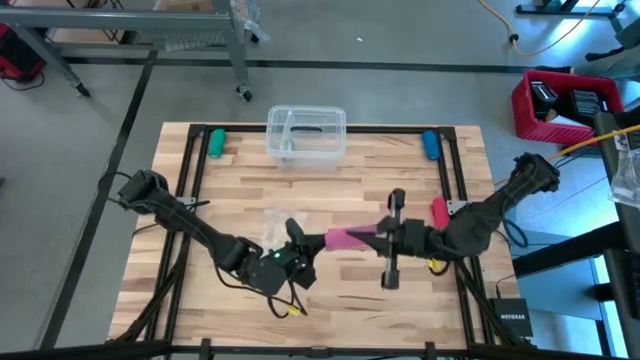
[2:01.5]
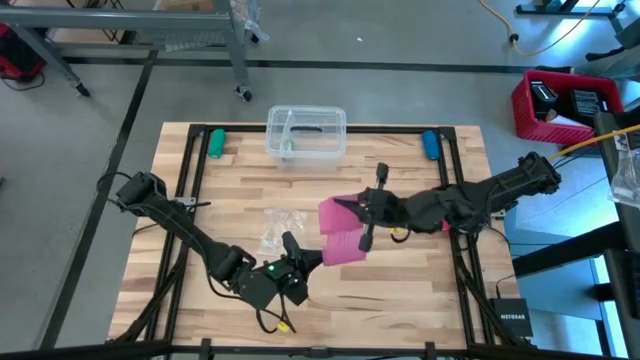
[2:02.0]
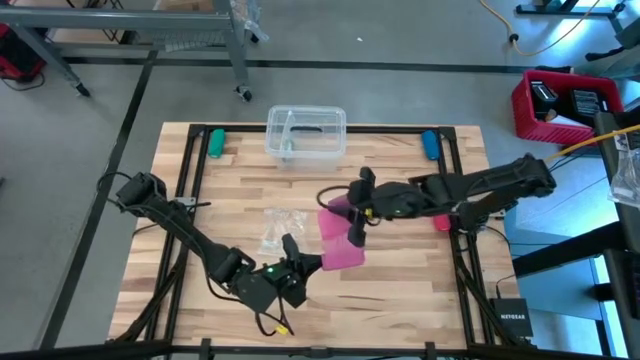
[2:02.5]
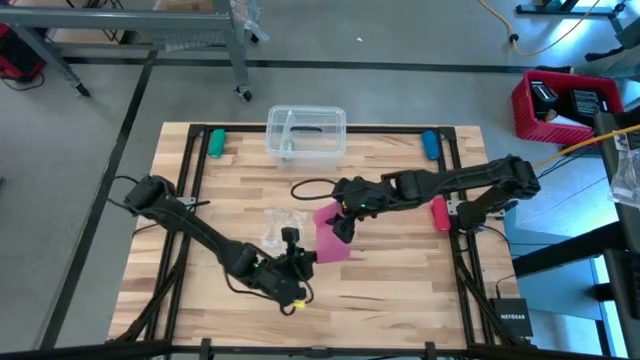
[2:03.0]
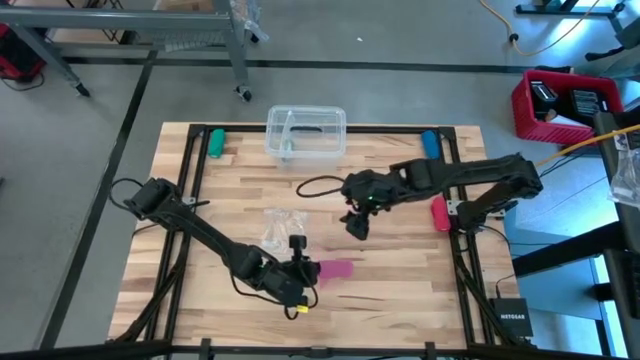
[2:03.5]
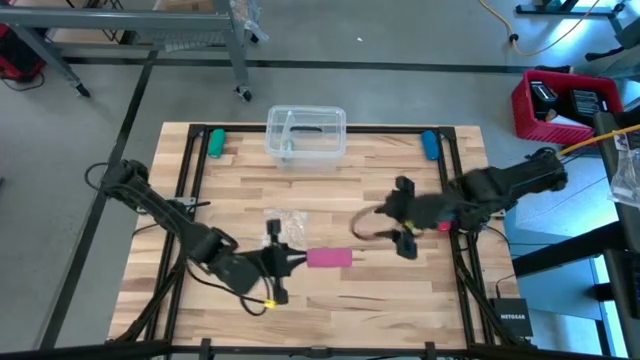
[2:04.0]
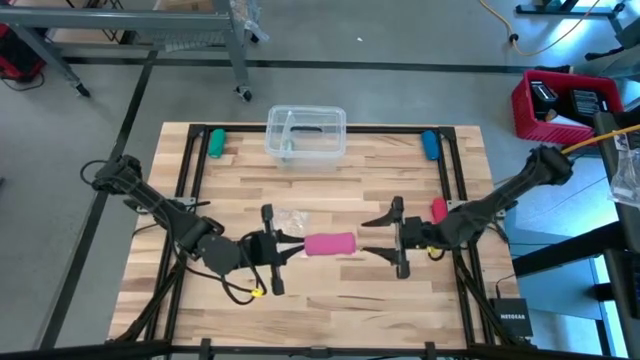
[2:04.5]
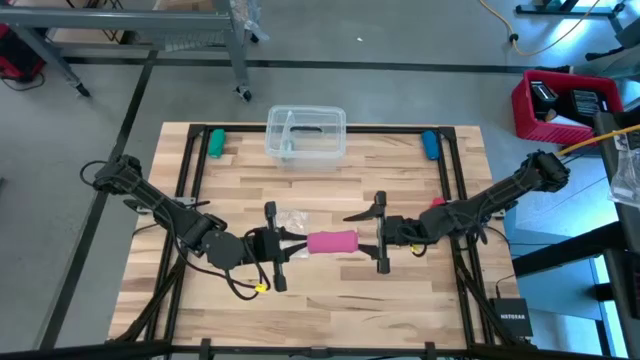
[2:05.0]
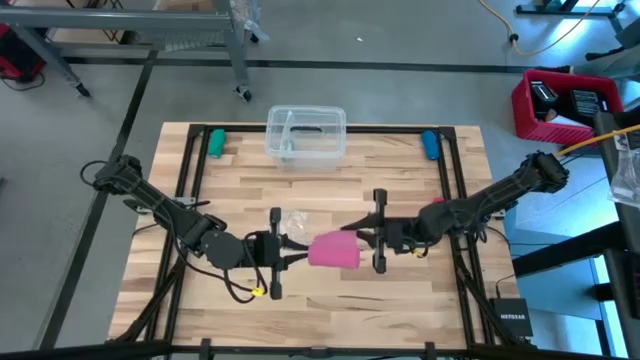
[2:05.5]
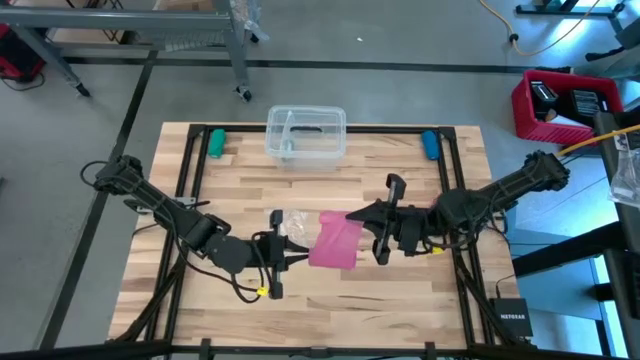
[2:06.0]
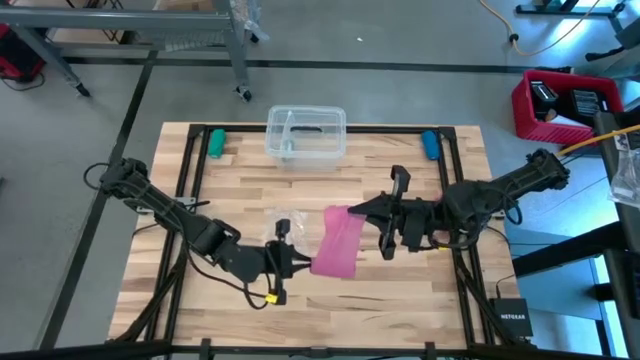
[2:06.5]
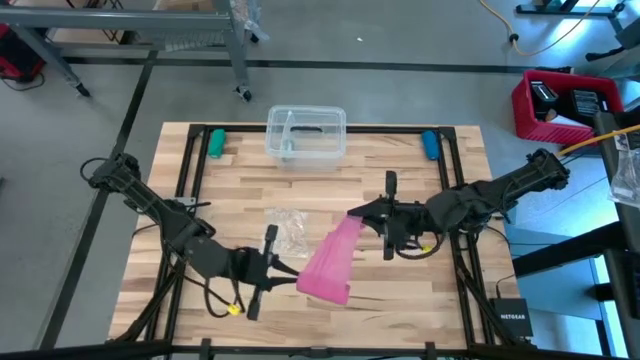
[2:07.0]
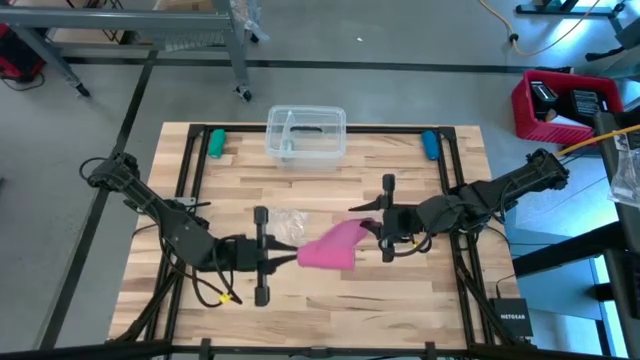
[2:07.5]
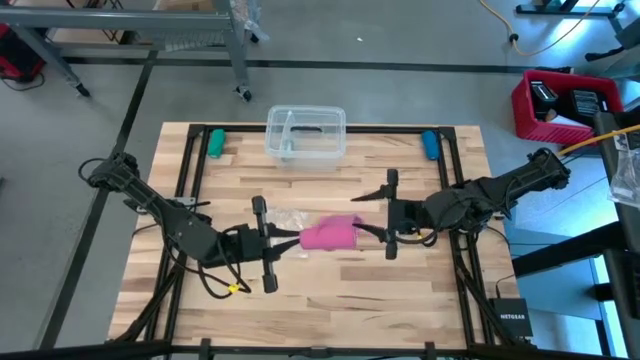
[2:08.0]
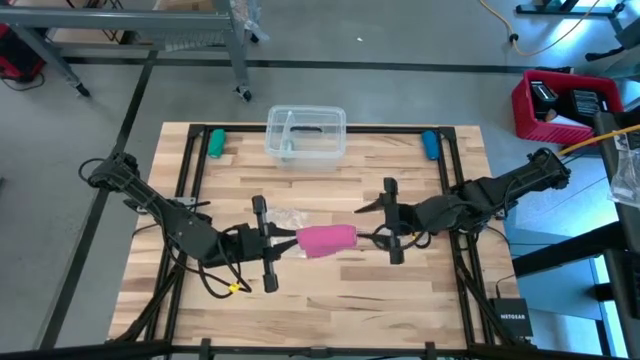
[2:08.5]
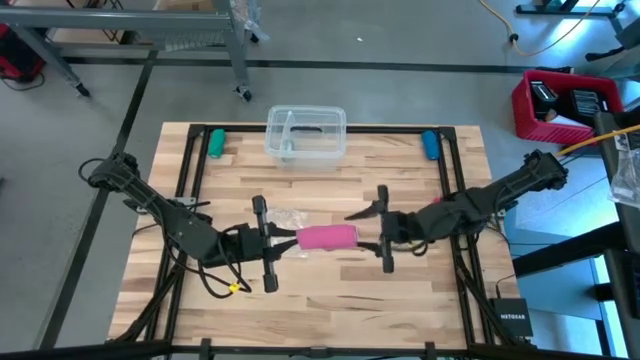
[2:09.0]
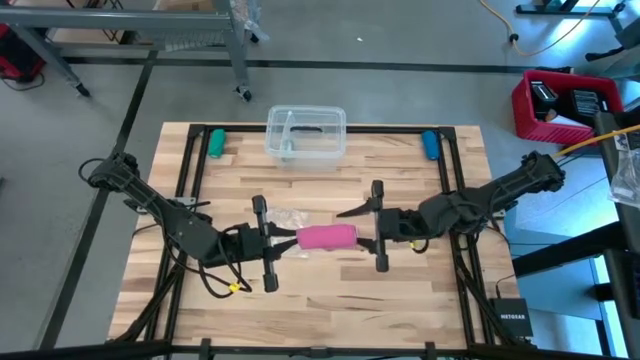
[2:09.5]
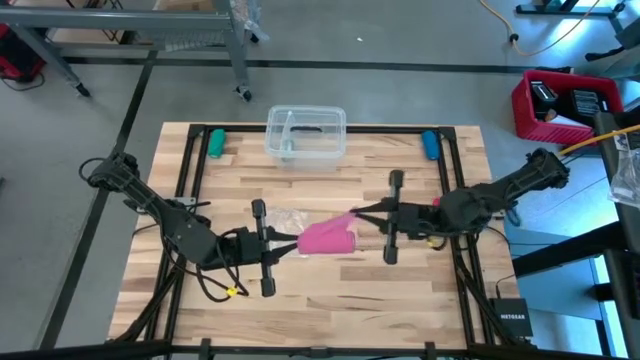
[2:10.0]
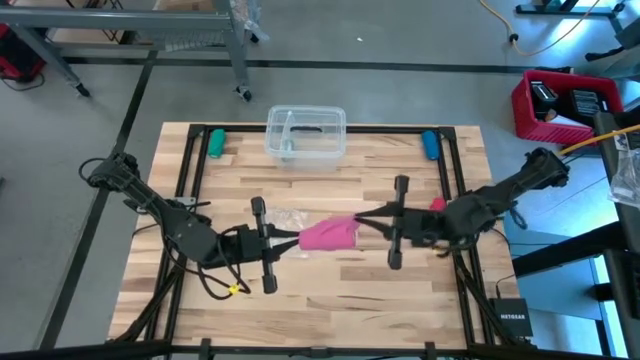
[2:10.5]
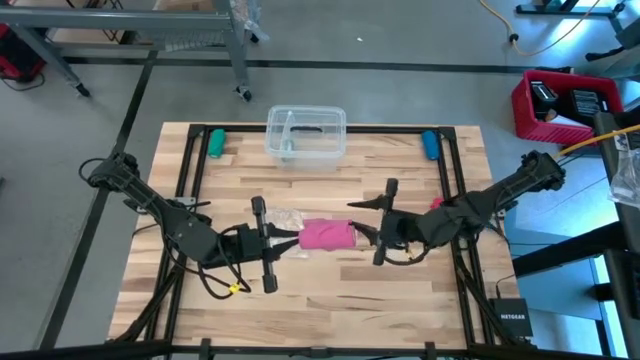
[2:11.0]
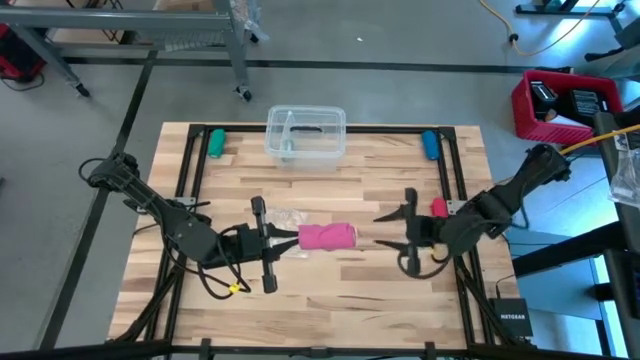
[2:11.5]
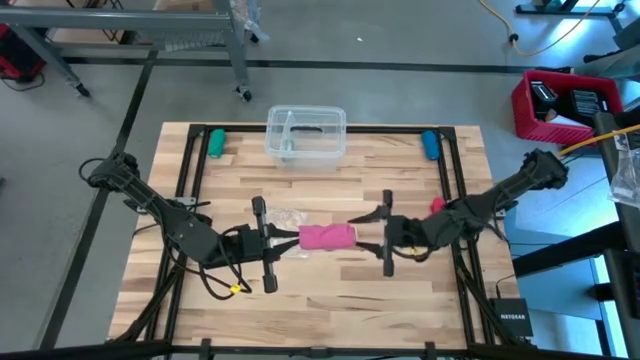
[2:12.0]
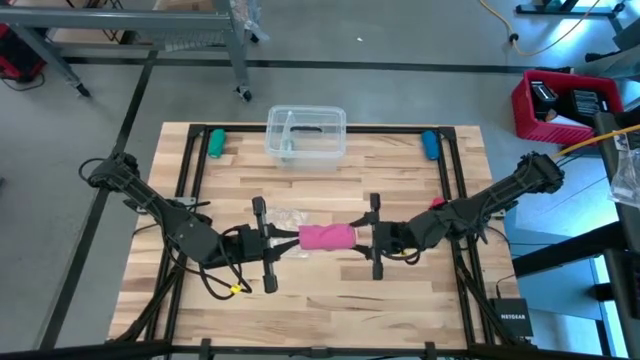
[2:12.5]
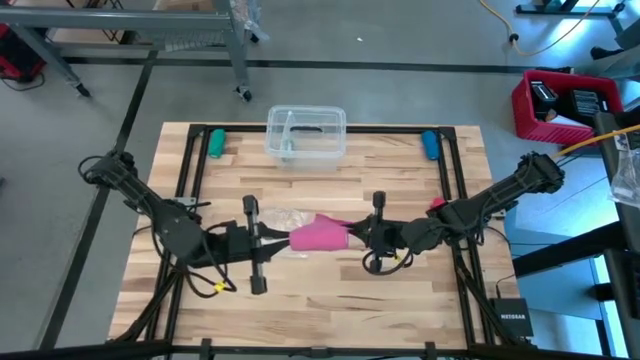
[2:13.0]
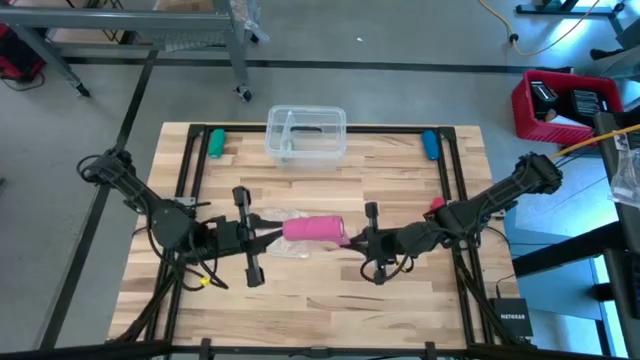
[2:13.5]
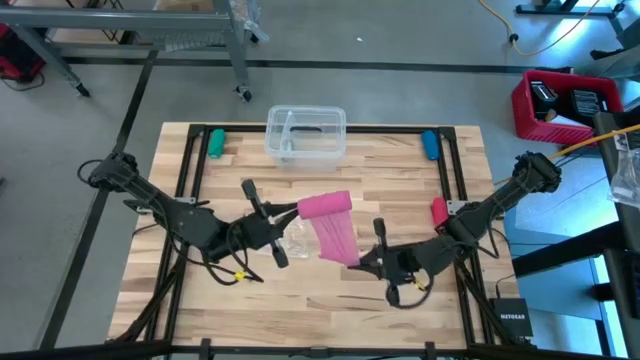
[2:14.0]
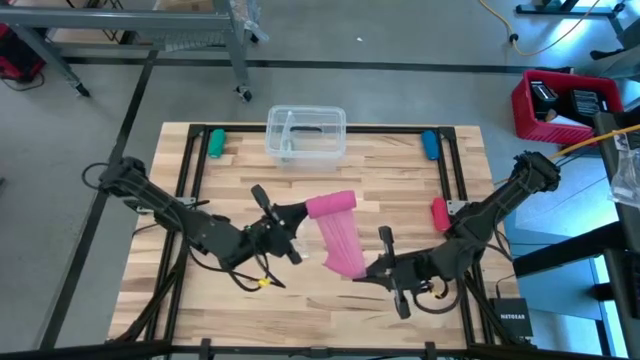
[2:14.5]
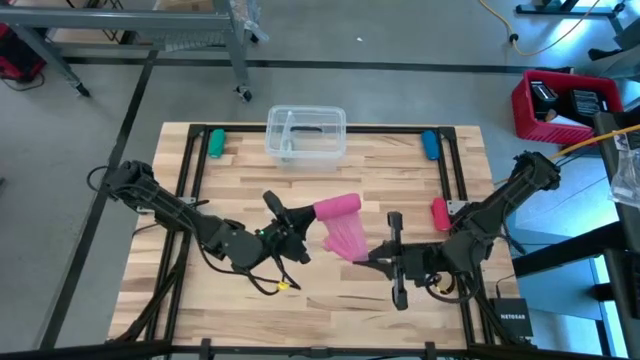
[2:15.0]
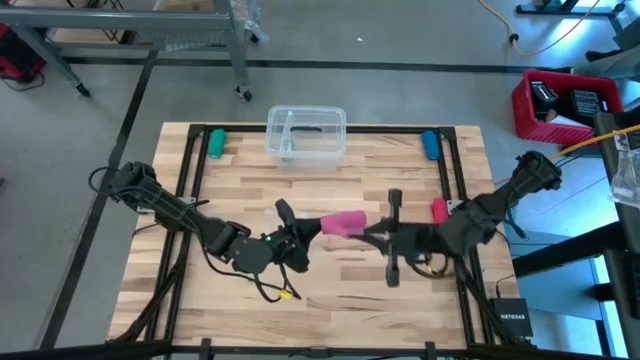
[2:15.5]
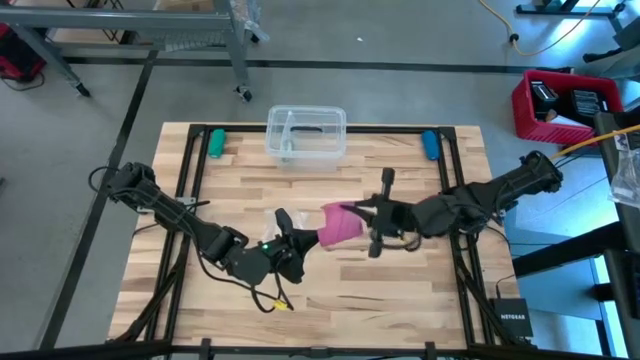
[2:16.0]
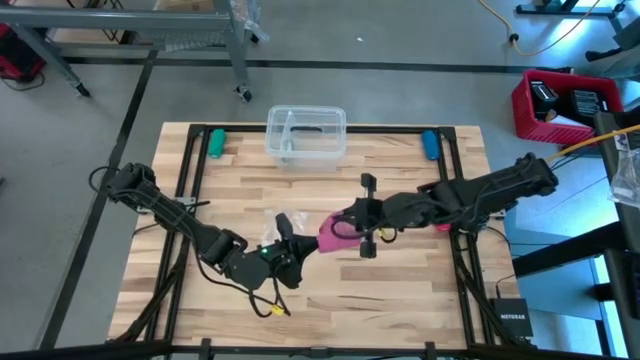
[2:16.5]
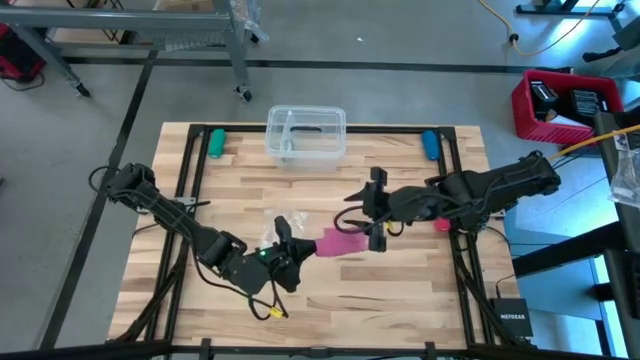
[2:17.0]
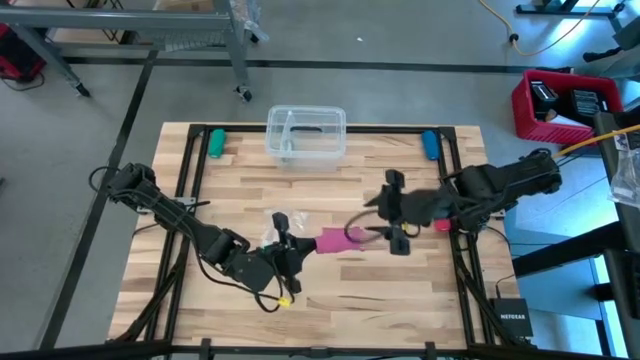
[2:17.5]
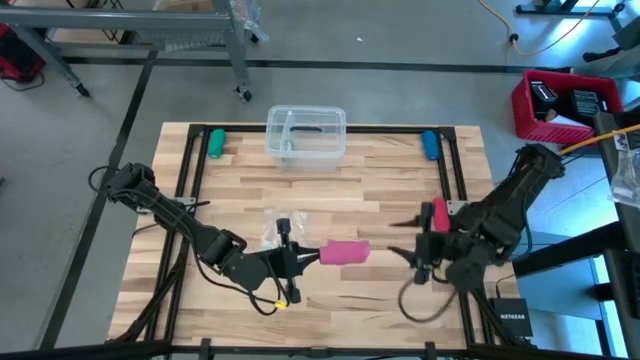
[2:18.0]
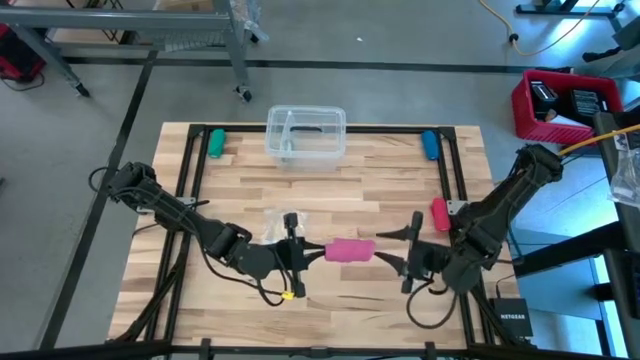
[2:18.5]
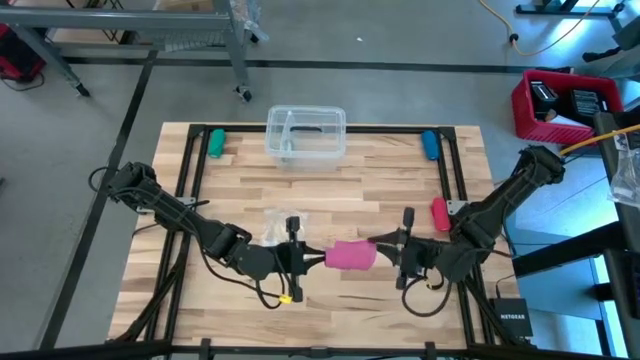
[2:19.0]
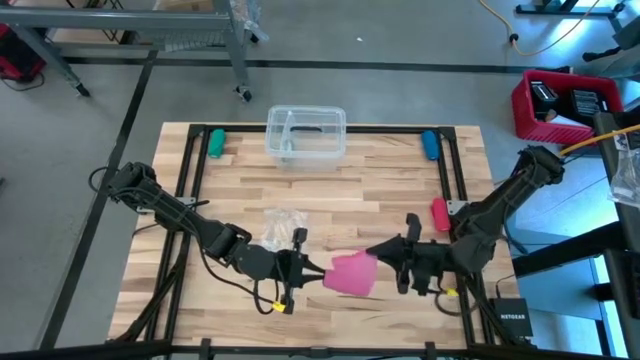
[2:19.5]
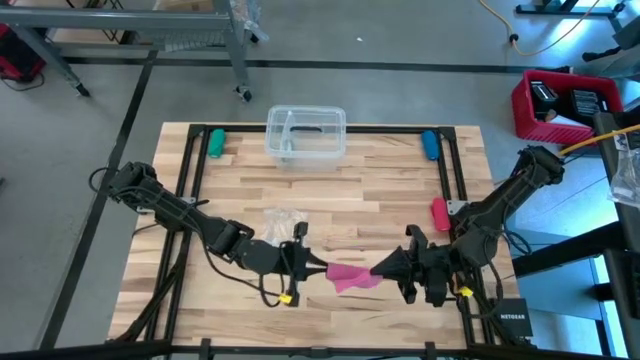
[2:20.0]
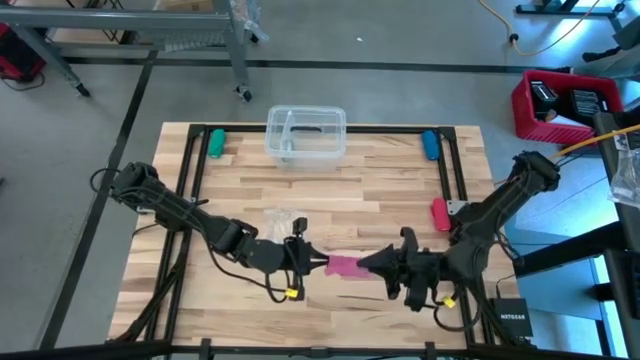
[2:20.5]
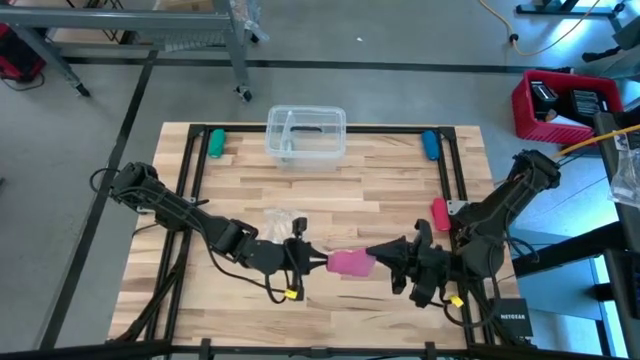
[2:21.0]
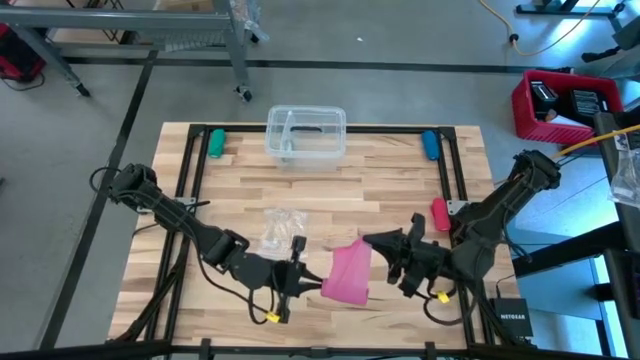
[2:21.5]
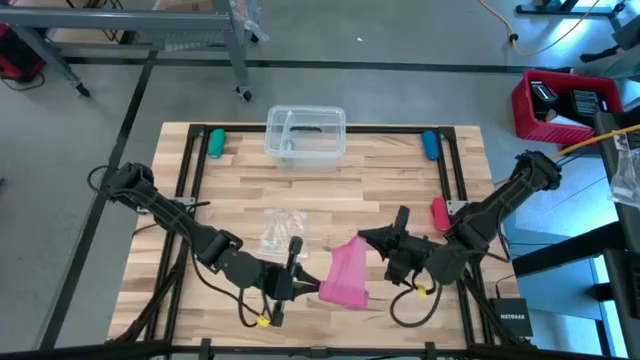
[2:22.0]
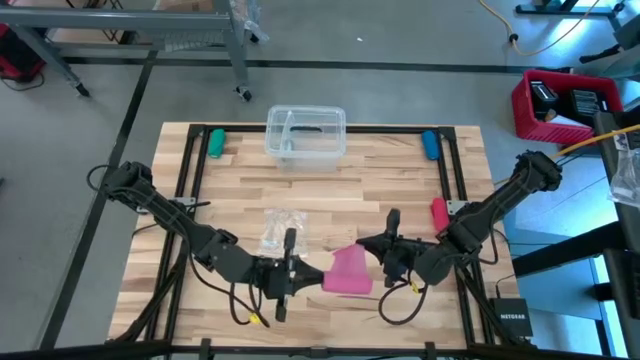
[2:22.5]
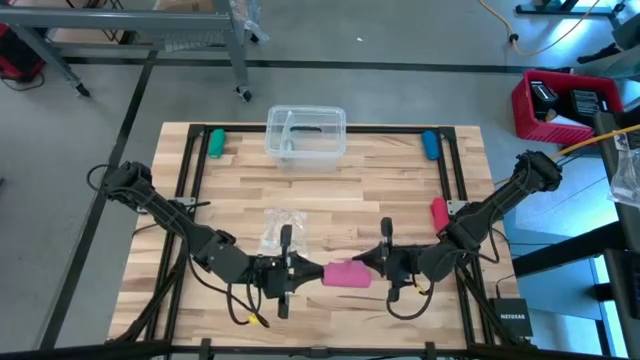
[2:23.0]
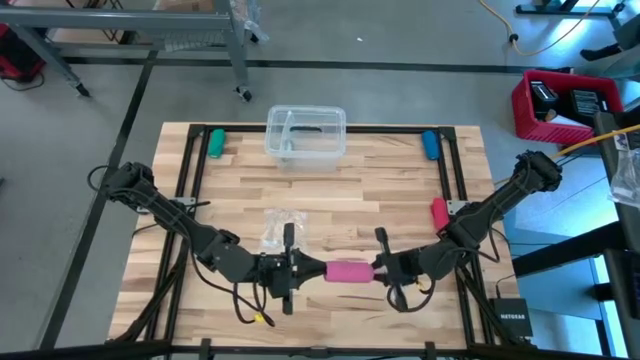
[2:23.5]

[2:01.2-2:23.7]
Task: Roll bandage
Roll the pink bandage
